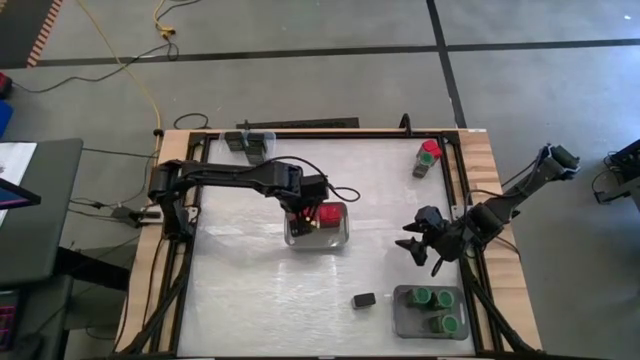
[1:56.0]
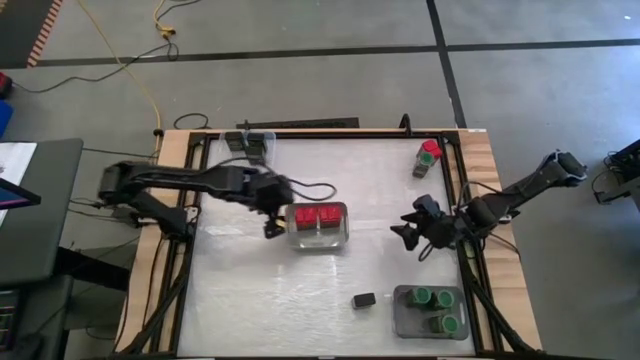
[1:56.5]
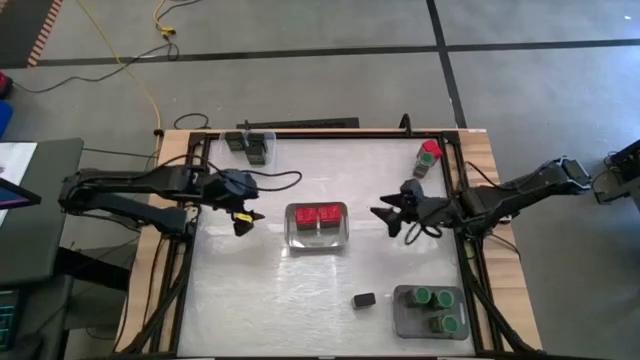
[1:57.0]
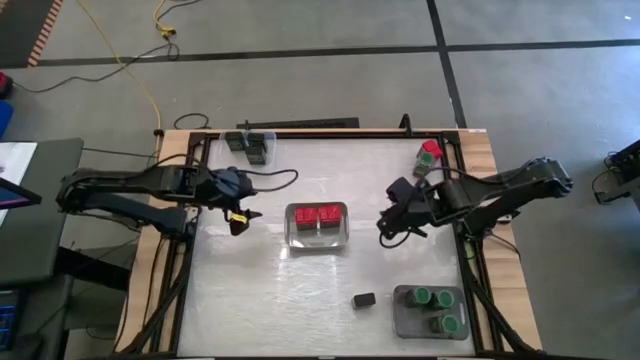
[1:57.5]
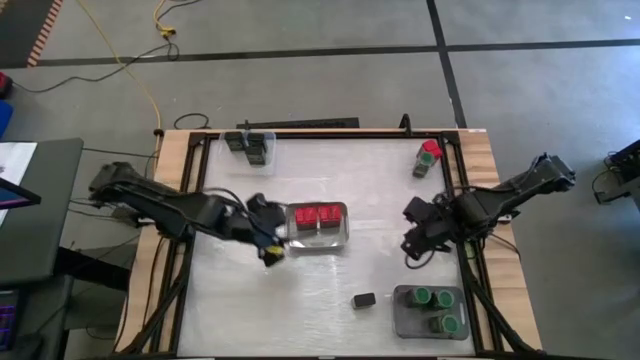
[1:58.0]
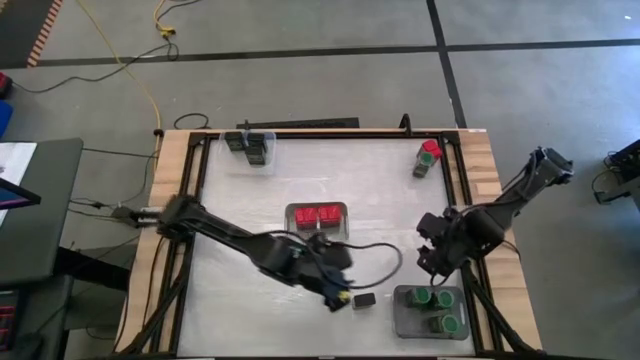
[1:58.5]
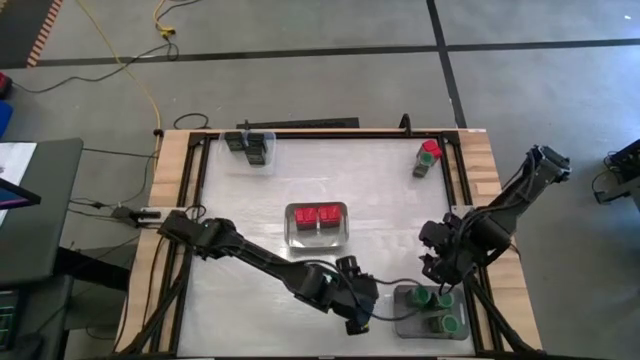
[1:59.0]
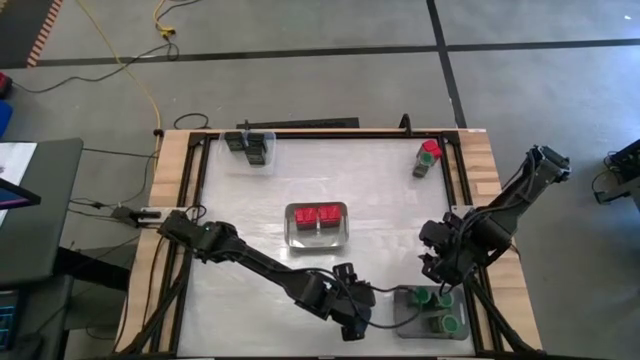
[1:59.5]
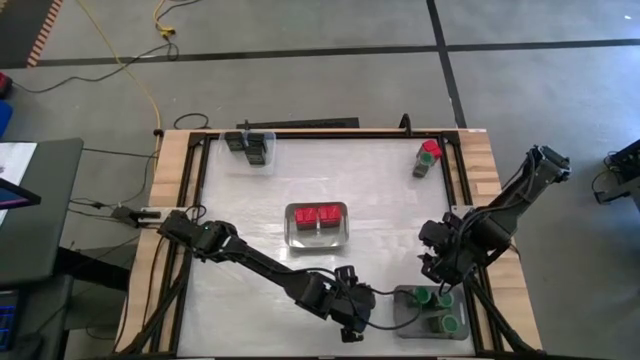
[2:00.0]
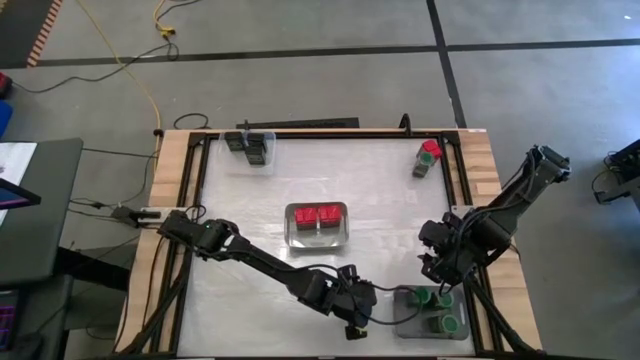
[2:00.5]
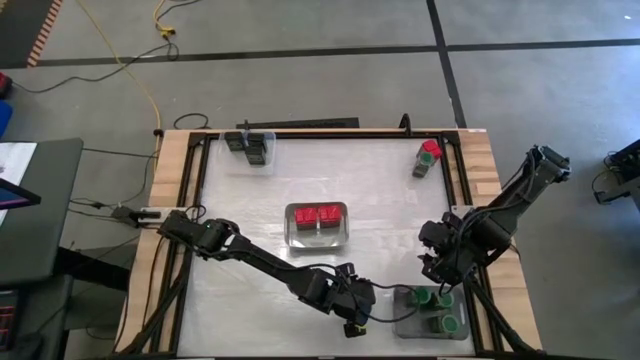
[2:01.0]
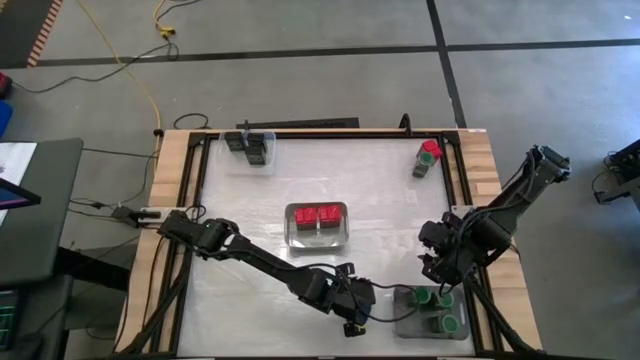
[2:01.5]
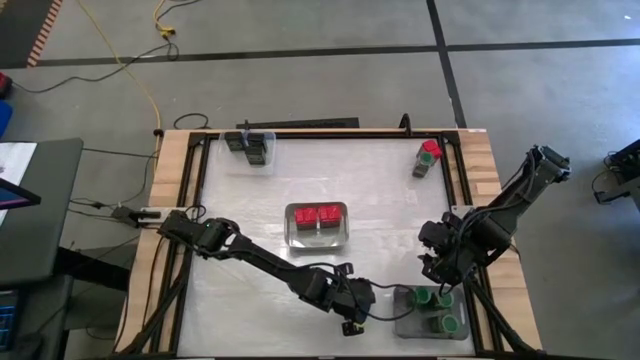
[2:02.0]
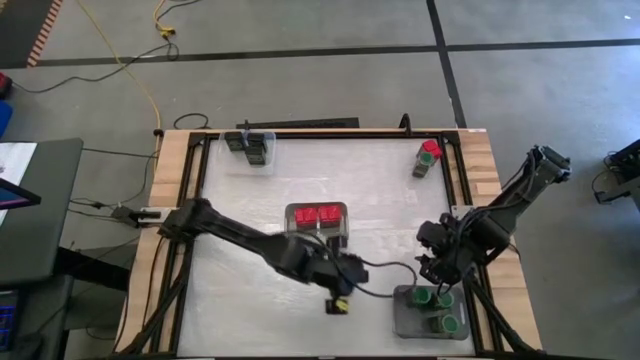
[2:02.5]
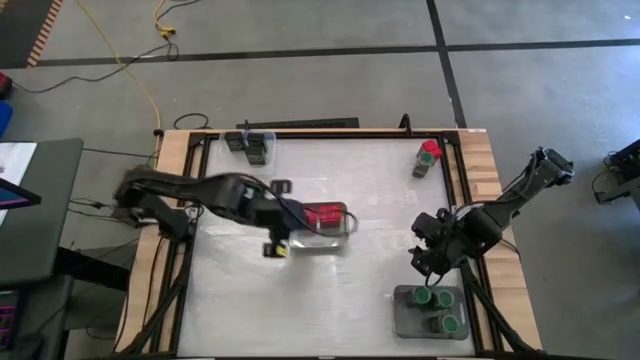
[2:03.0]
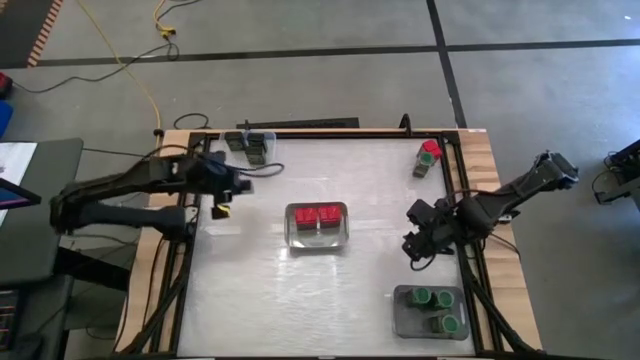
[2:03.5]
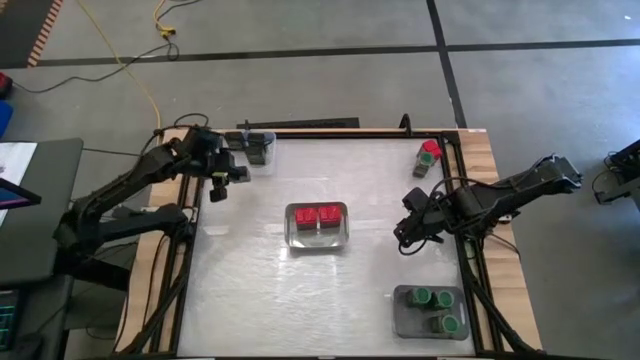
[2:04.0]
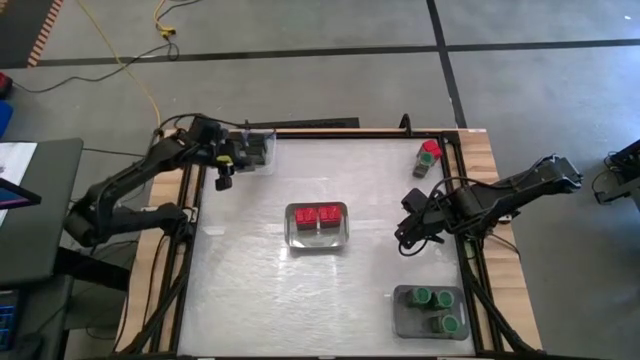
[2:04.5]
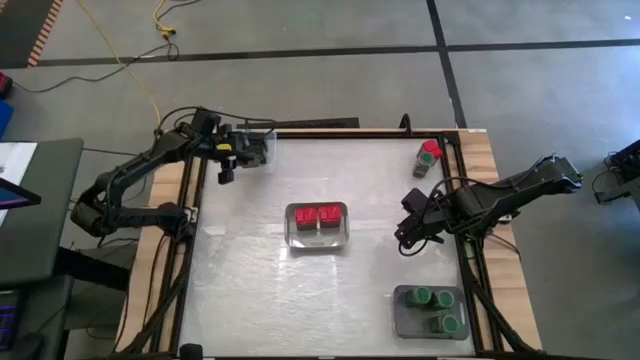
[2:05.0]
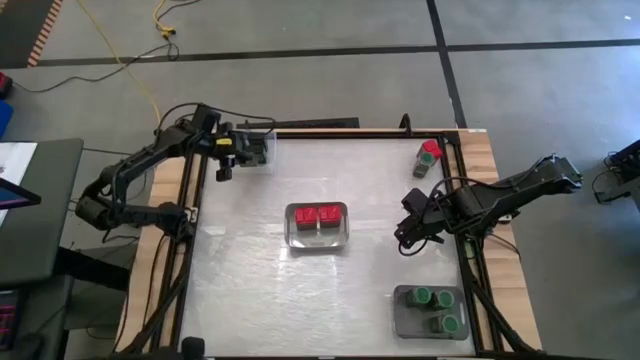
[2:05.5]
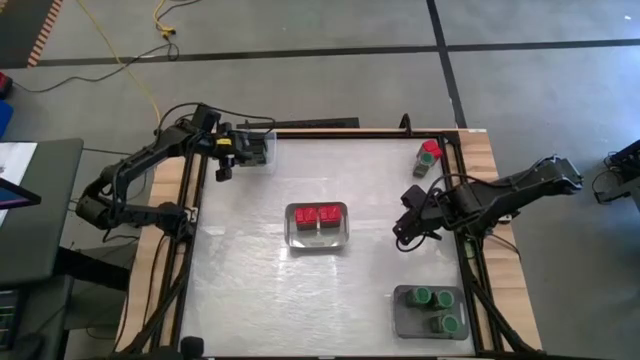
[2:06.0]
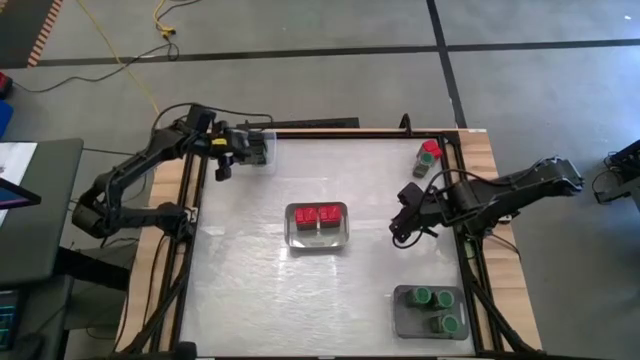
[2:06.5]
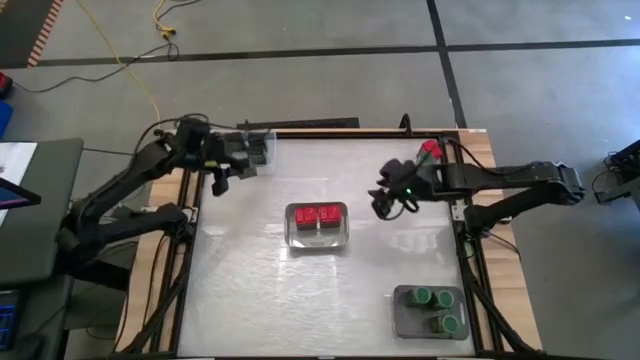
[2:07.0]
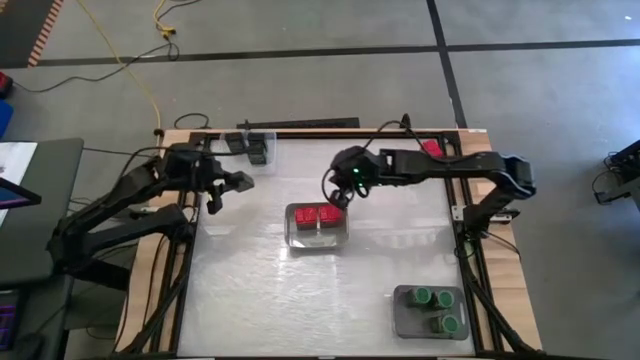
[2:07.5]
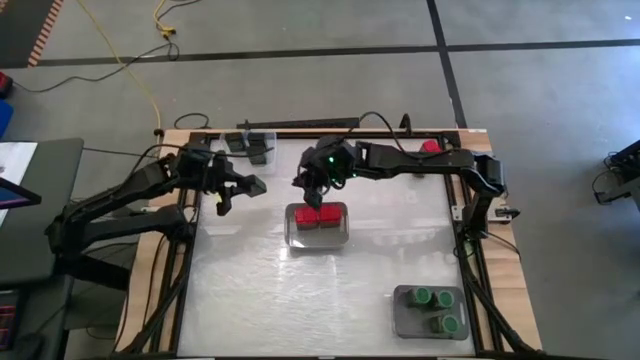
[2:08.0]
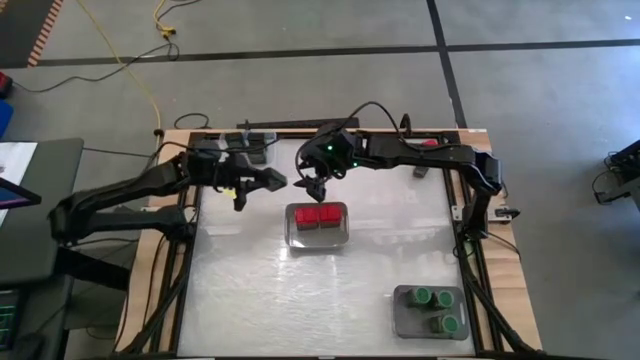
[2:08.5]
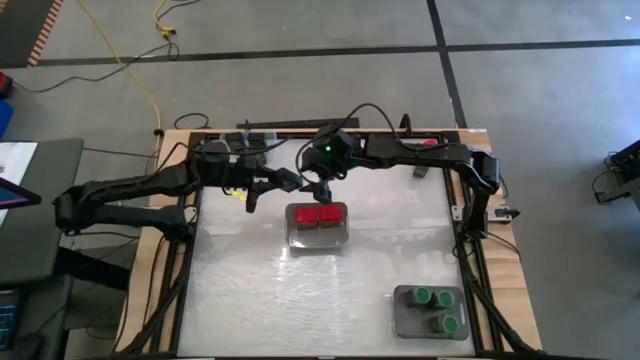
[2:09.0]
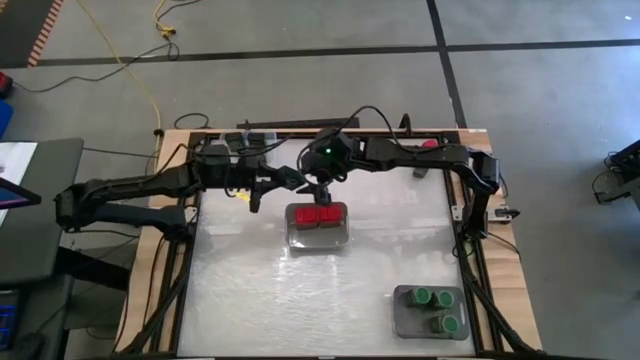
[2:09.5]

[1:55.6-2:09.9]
Task: Sort spices by type
Put the black seasoning can into the transparent bin

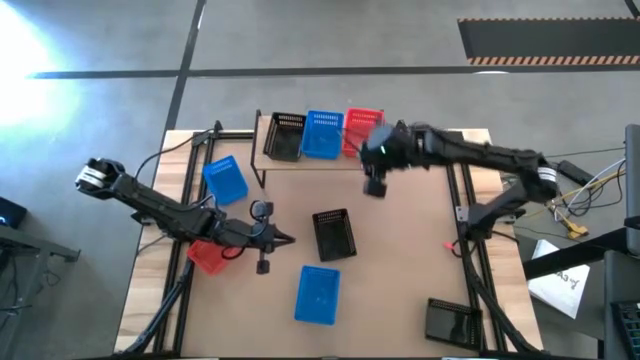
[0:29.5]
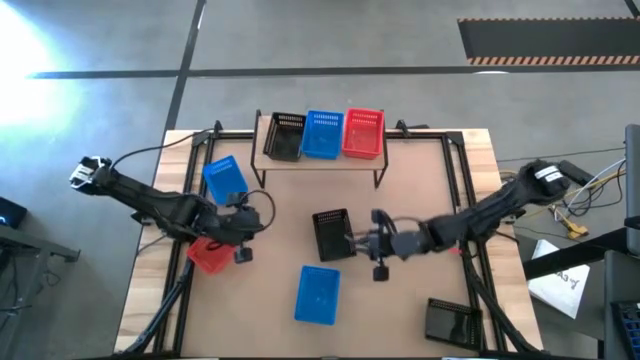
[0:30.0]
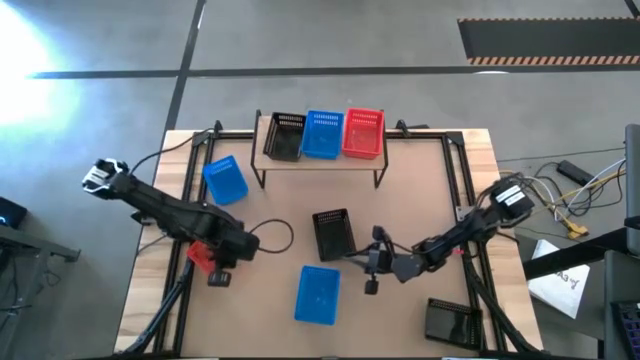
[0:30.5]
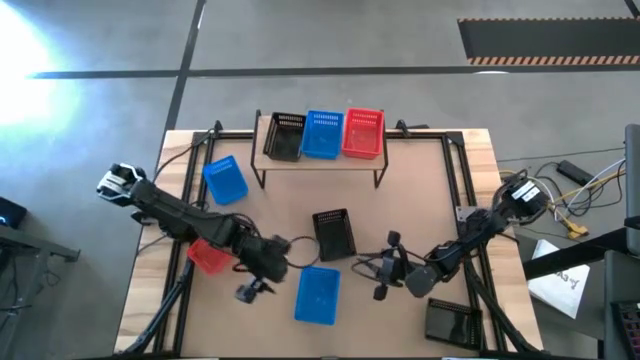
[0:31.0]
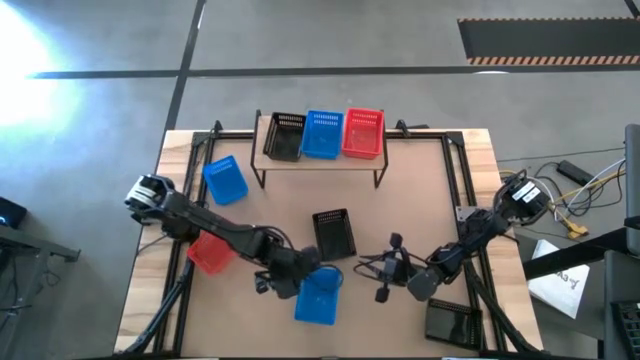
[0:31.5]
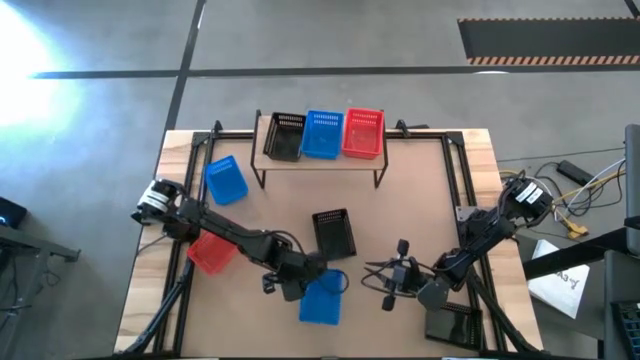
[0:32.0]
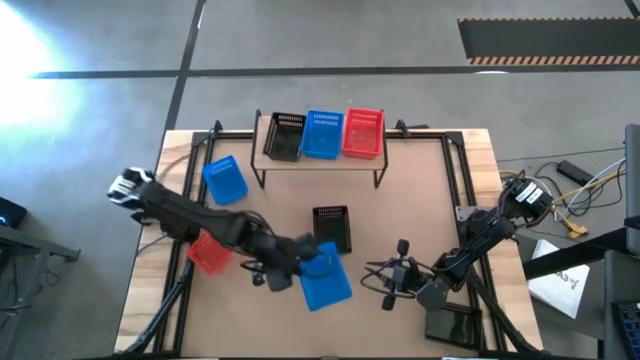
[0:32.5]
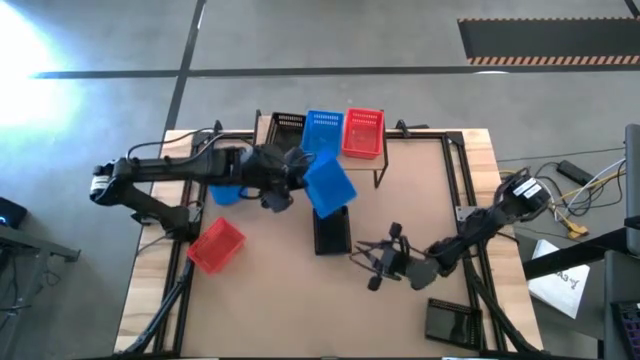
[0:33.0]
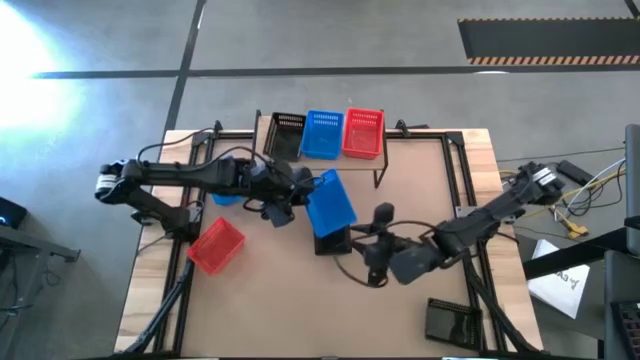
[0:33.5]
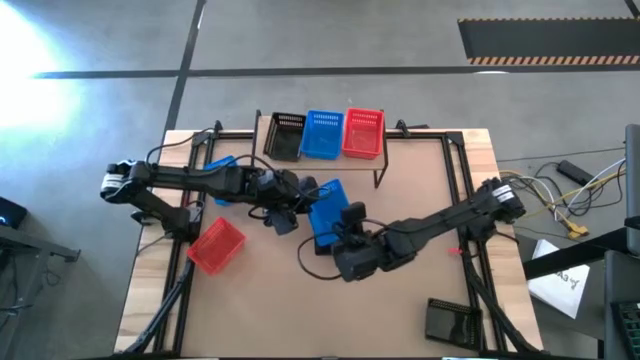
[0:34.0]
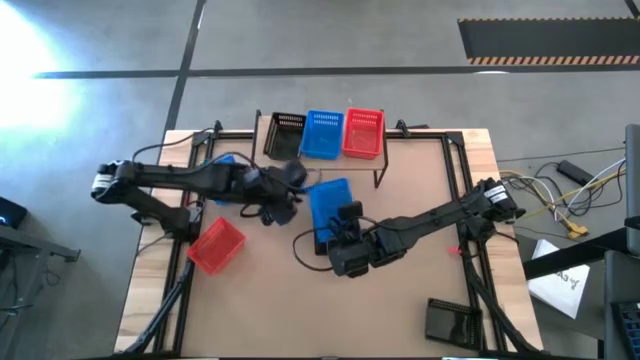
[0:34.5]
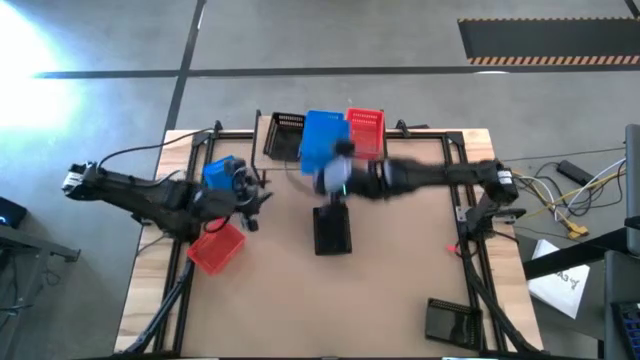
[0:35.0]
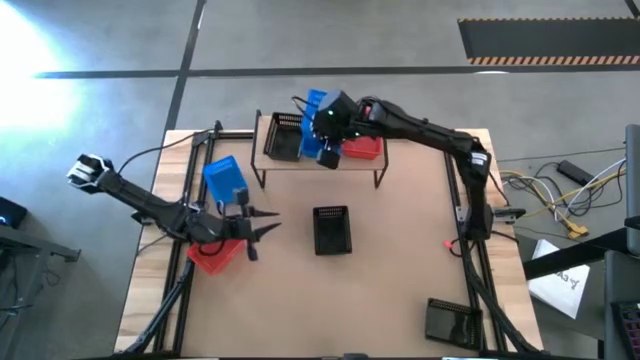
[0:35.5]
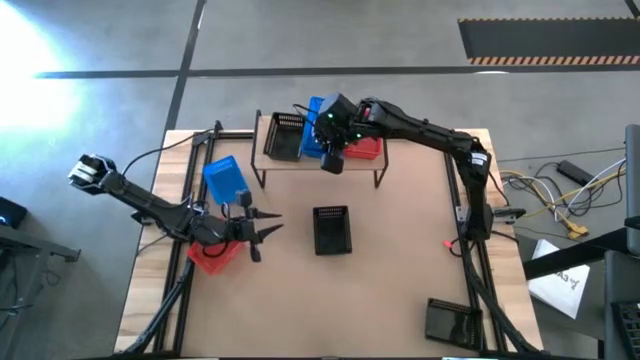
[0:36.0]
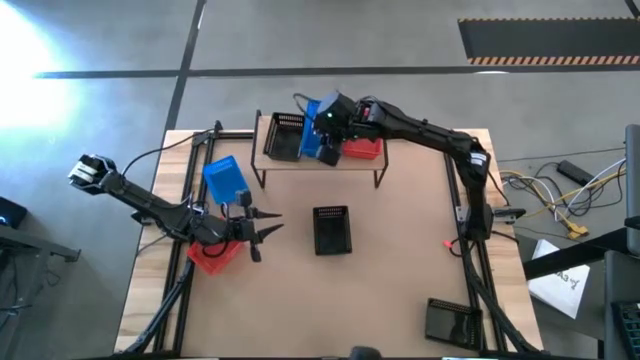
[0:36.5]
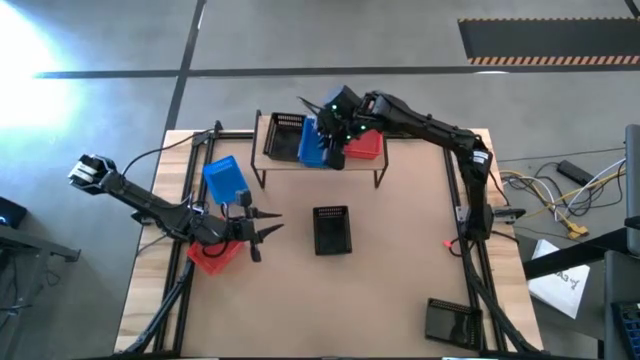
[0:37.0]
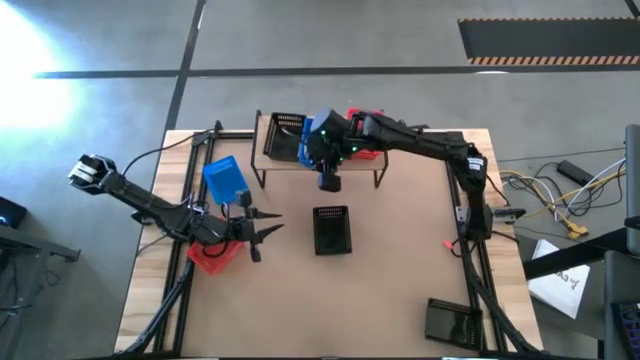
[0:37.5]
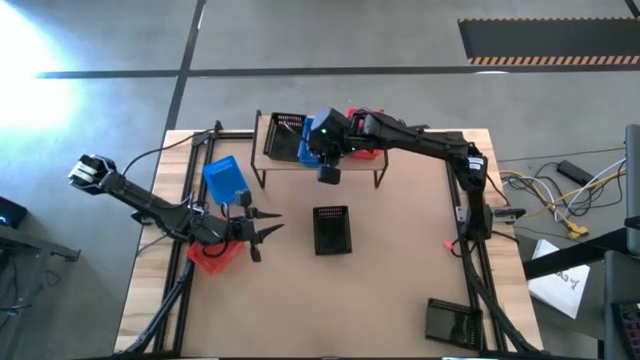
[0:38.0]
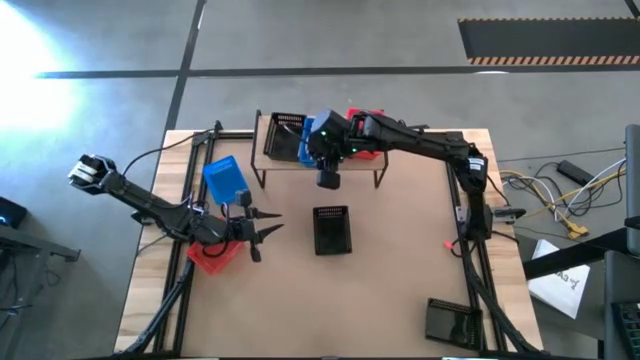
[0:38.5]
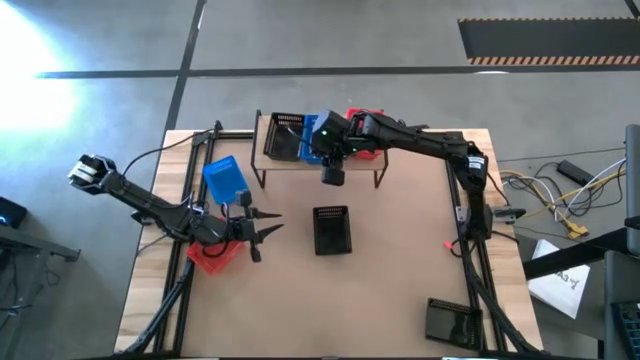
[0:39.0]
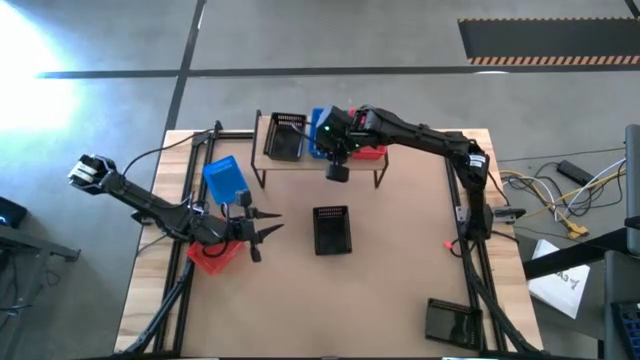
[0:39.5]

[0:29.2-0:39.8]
Task: Stack baskets on shelf by color
Stack the bottom blue bin on the blue bin on the shelf
